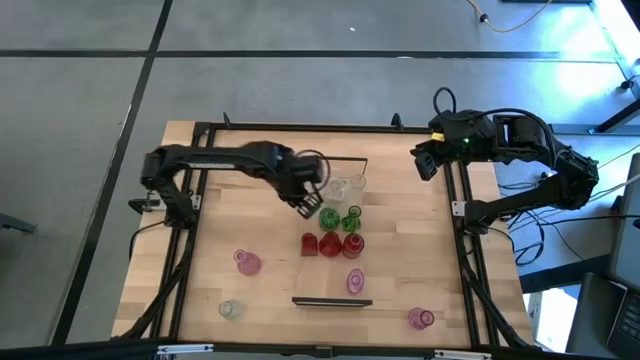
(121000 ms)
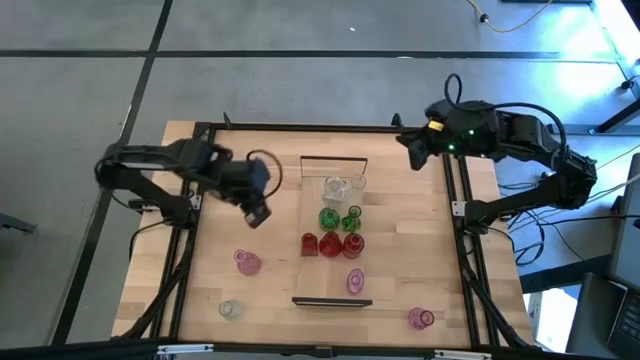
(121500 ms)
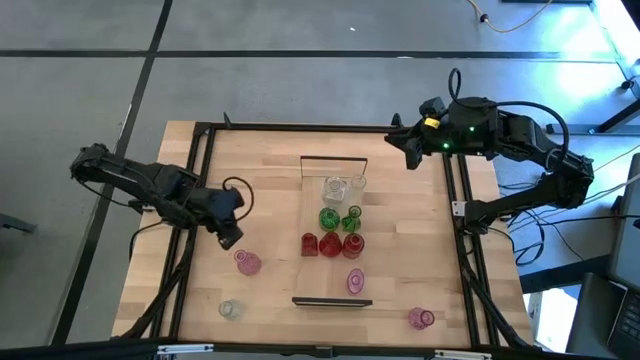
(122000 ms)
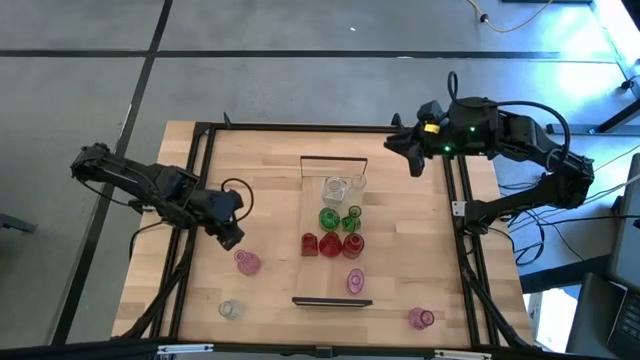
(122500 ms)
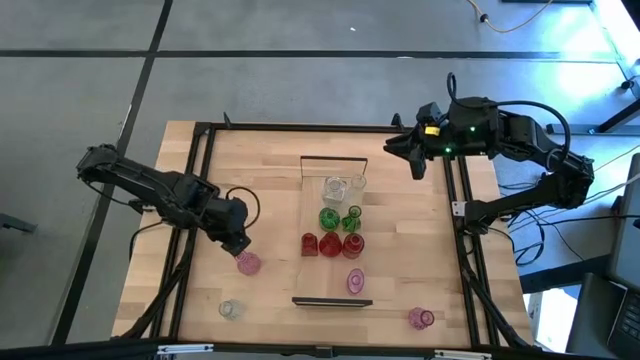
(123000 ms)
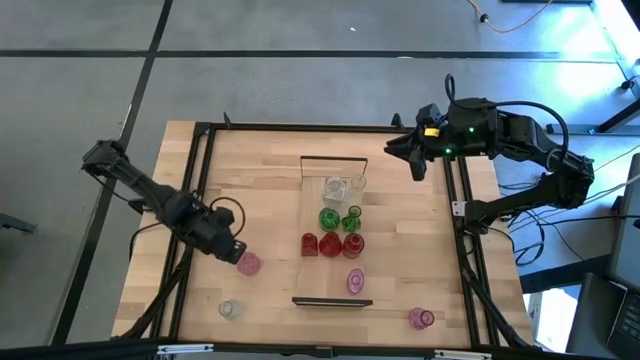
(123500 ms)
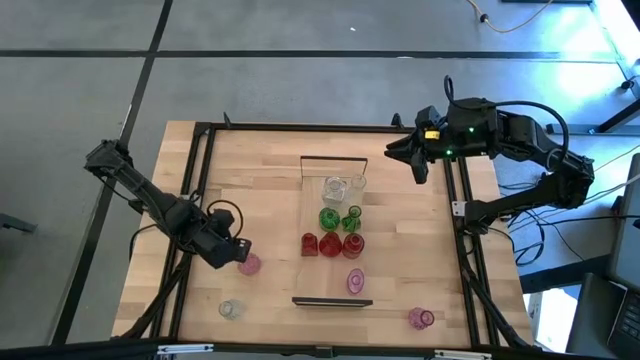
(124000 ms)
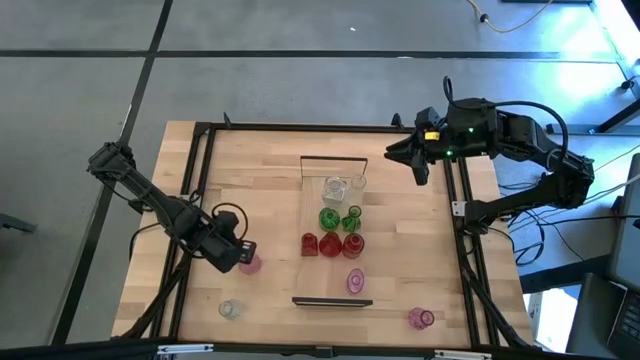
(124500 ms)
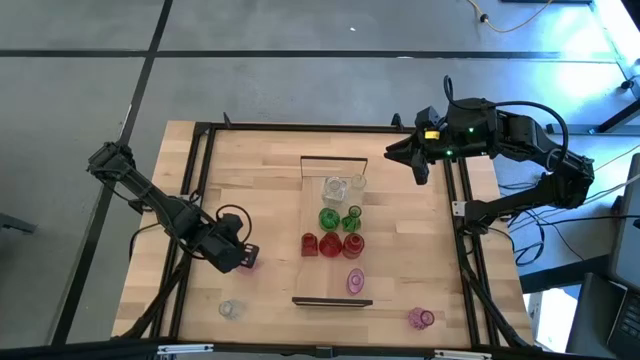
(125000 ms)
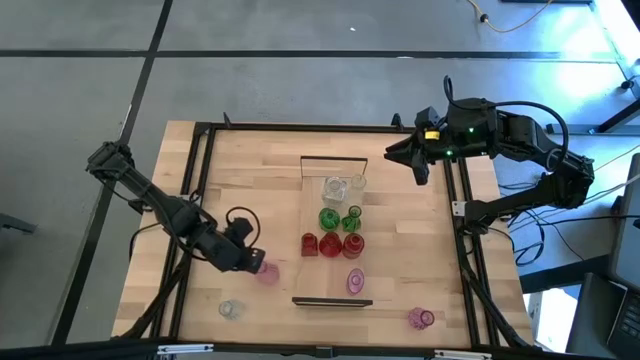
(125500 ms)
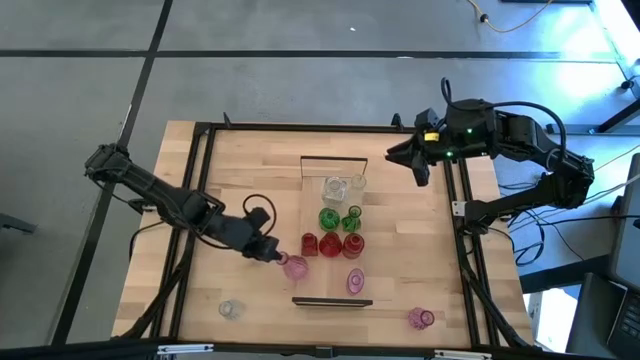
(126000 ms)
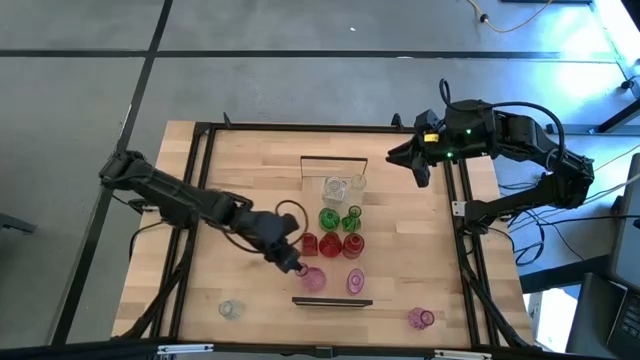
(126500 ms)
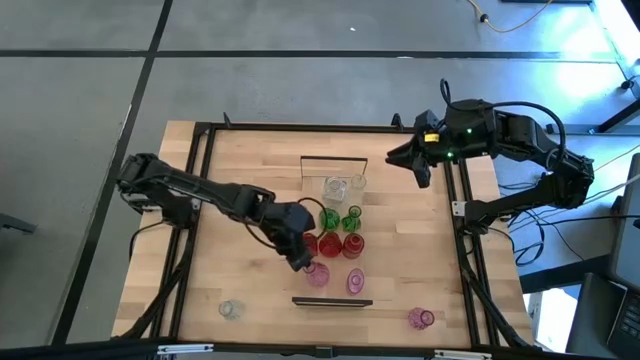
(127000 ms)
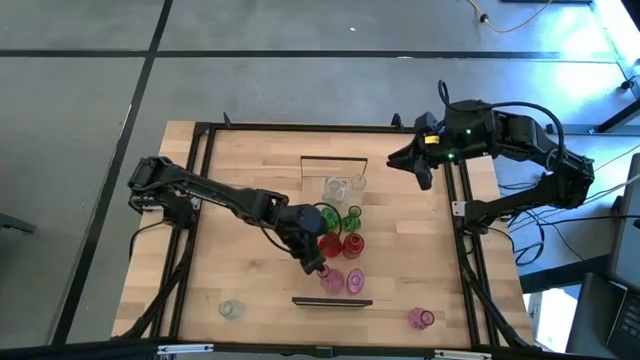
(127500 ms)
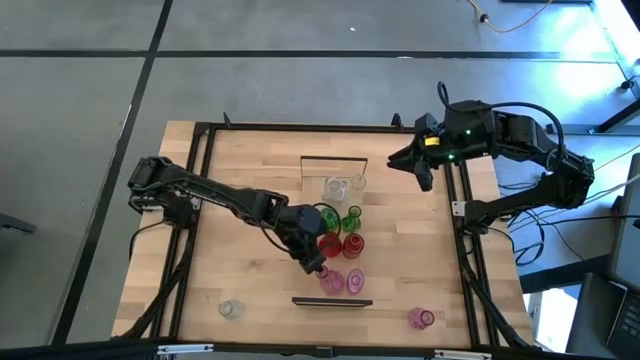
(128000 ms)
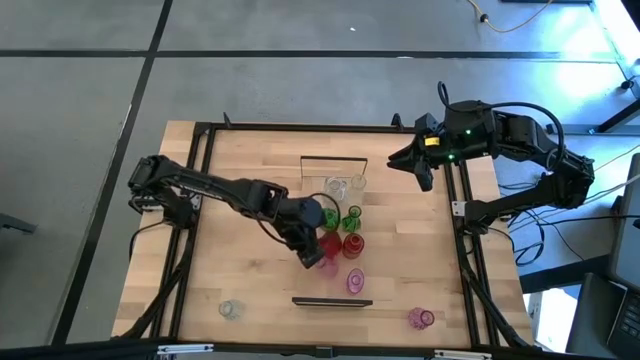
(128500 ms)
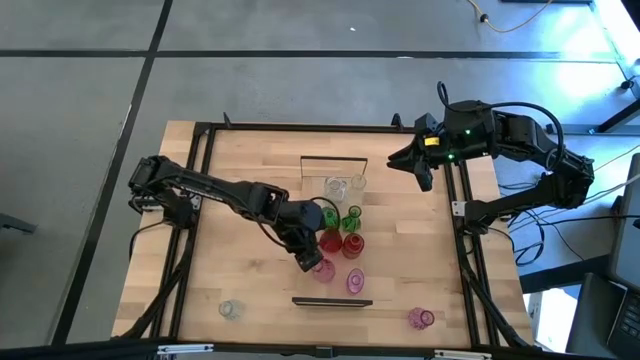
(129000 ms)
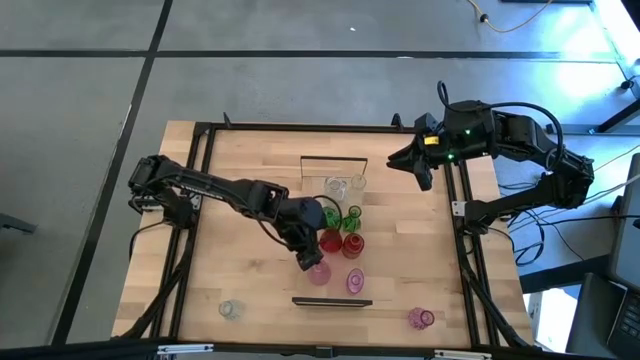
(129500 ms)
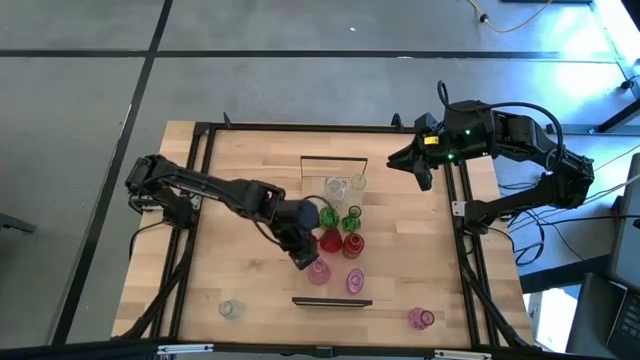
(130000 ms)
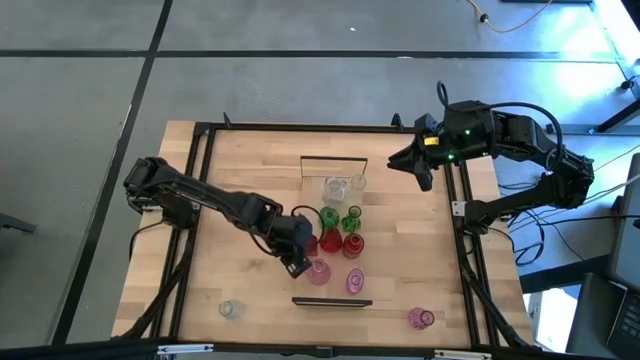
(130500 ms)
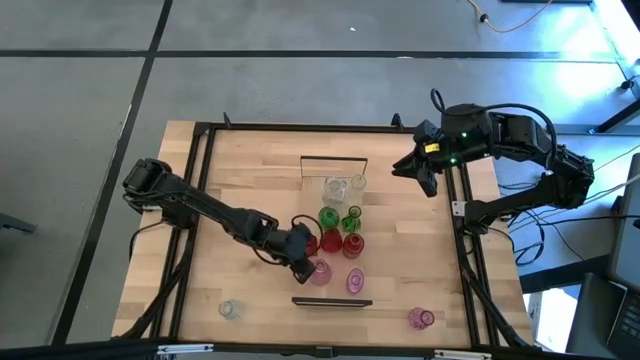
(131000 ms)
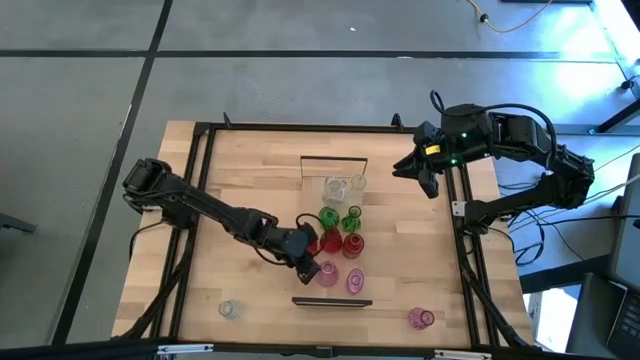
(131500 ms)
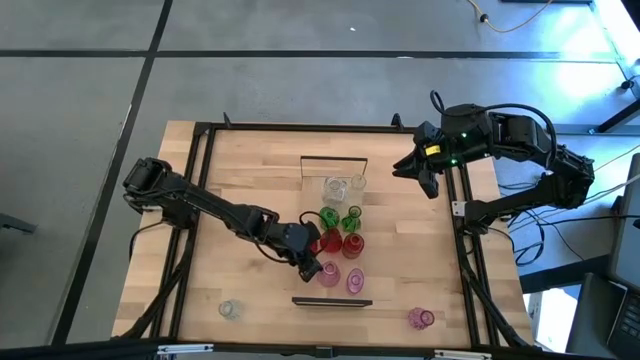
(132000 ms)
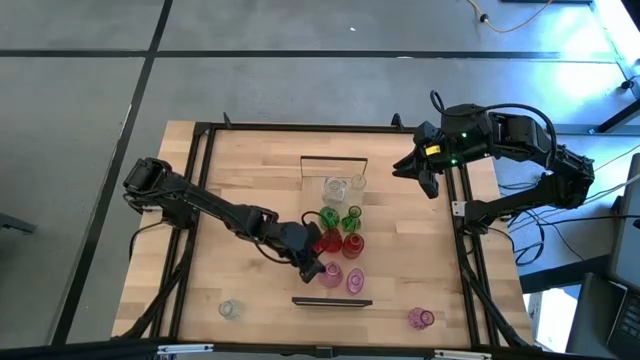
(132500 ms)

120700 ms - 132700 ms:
Task: sort vases onto shelf
Put the left pink vase aligned with the other pink vase on the shelf

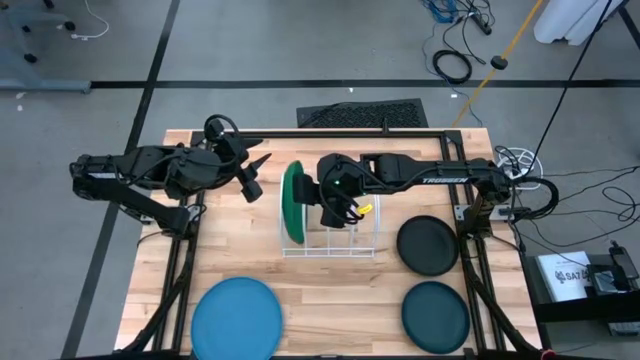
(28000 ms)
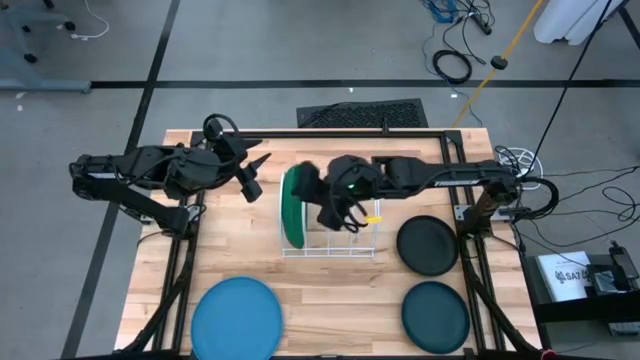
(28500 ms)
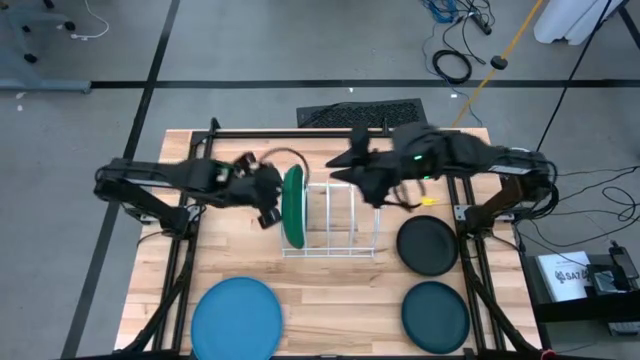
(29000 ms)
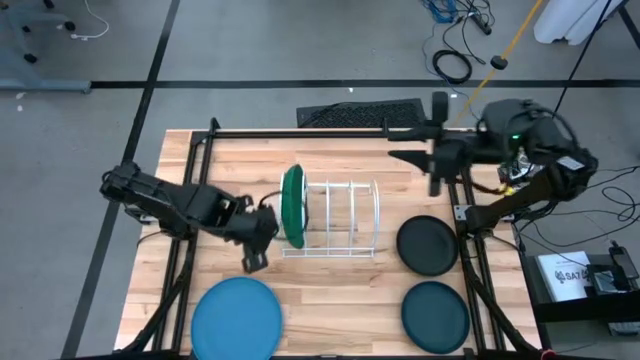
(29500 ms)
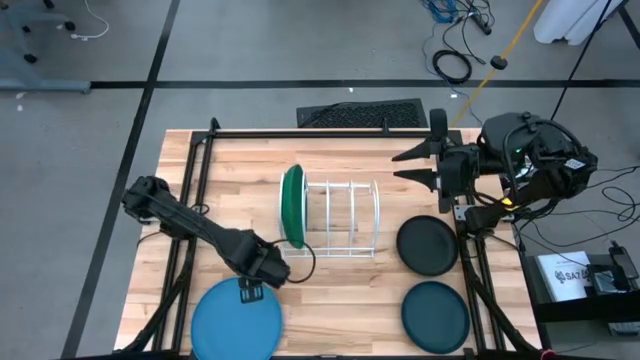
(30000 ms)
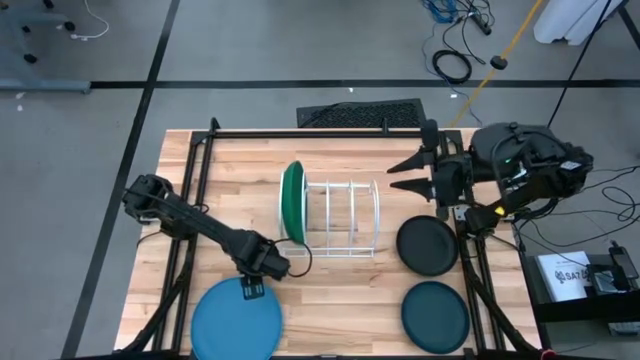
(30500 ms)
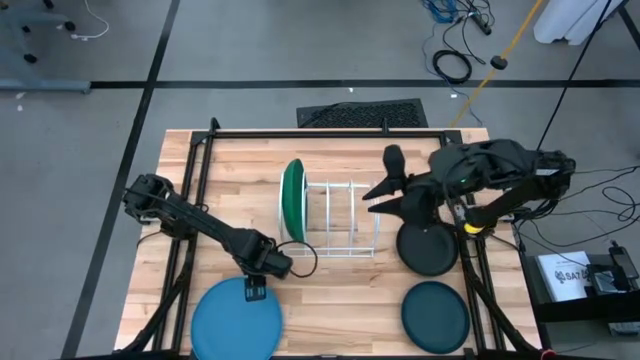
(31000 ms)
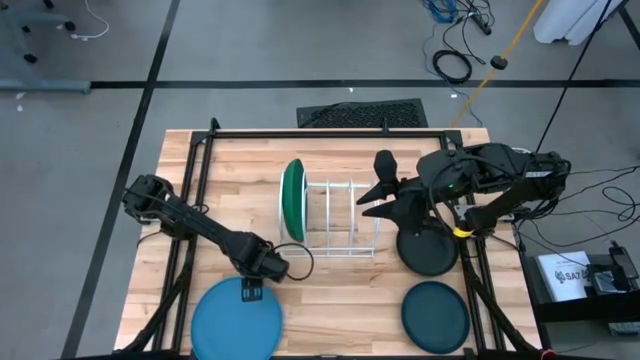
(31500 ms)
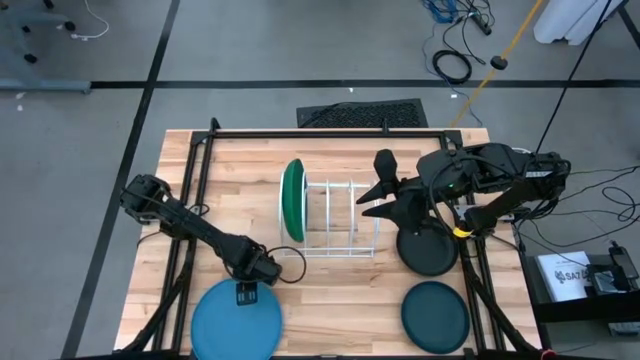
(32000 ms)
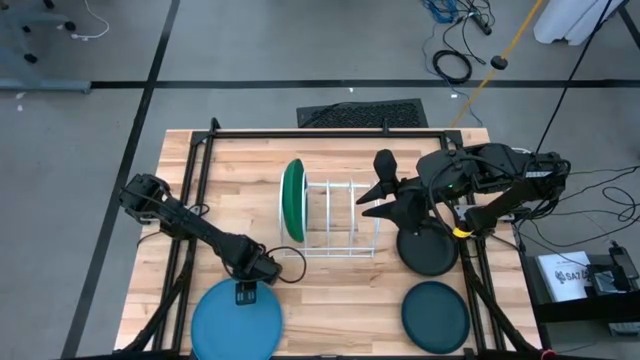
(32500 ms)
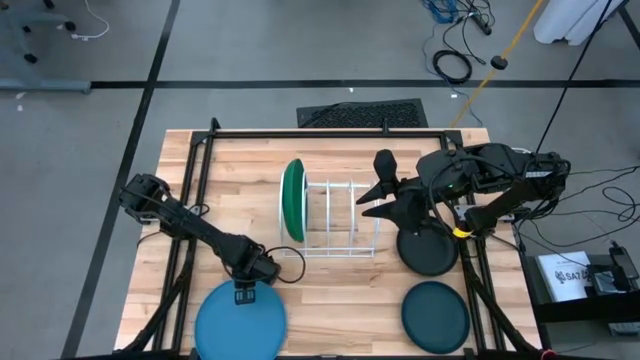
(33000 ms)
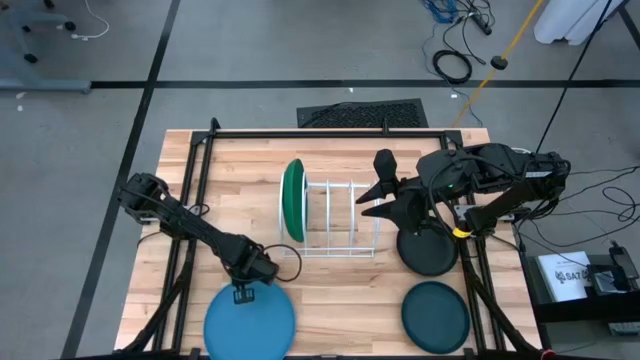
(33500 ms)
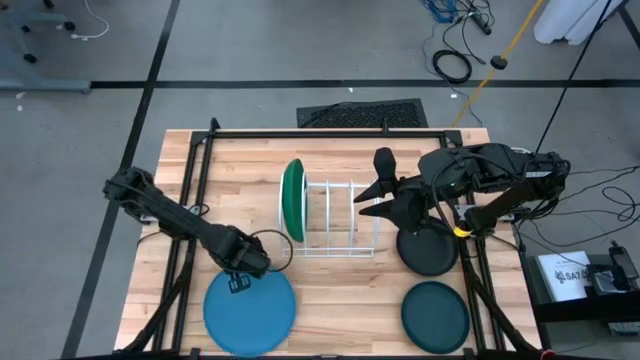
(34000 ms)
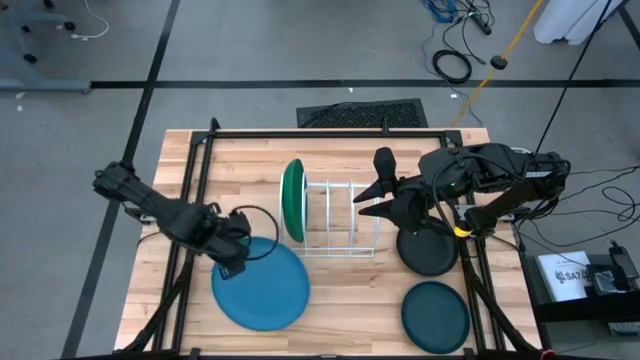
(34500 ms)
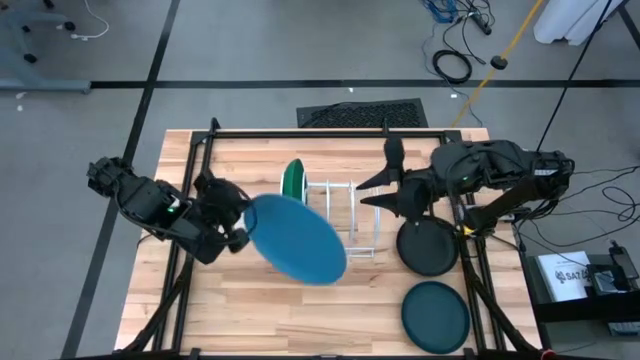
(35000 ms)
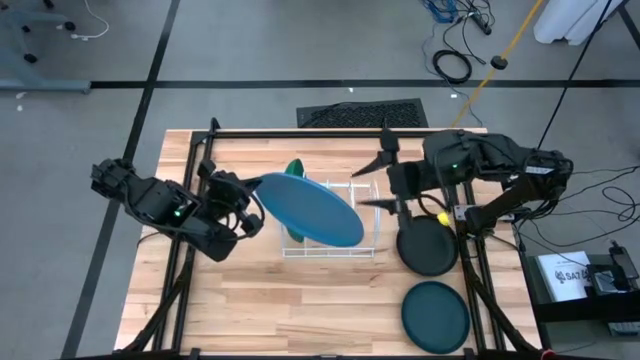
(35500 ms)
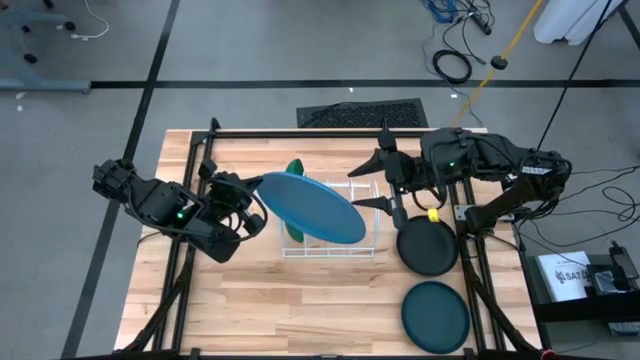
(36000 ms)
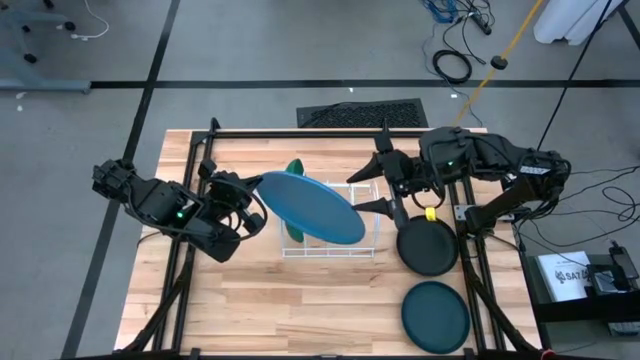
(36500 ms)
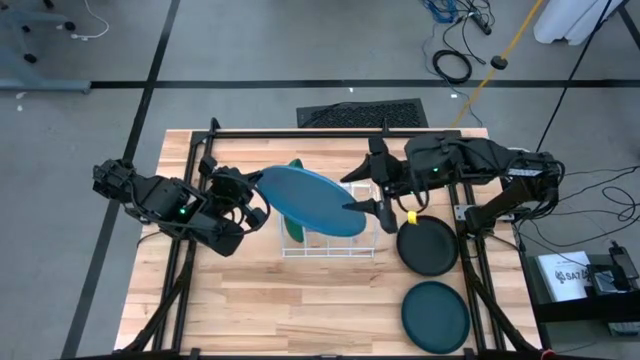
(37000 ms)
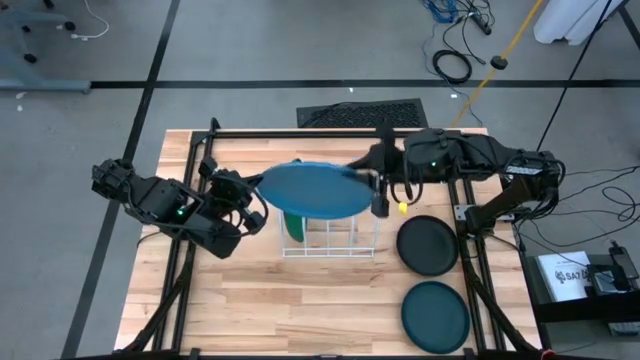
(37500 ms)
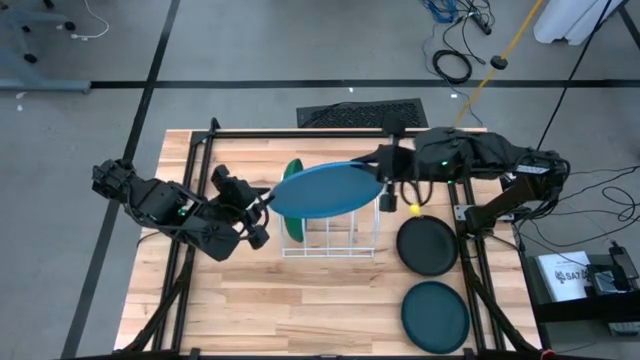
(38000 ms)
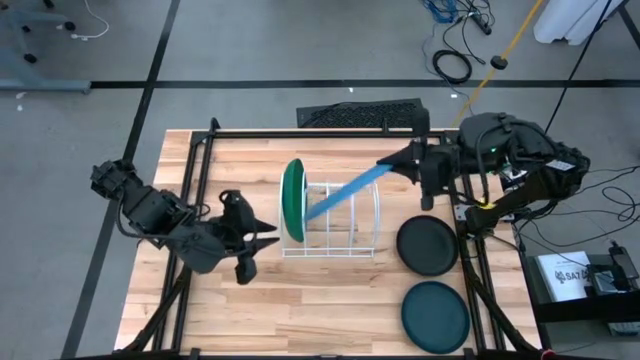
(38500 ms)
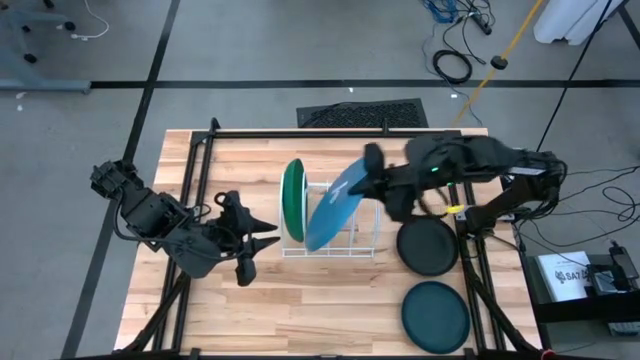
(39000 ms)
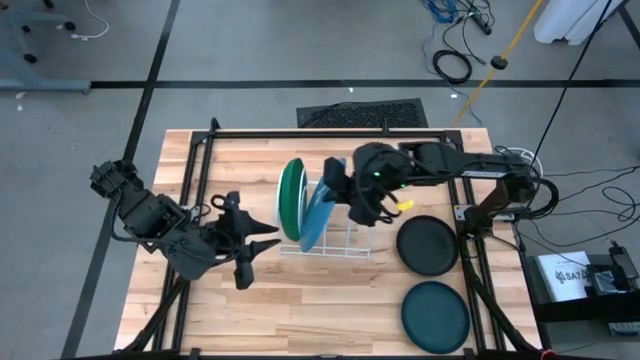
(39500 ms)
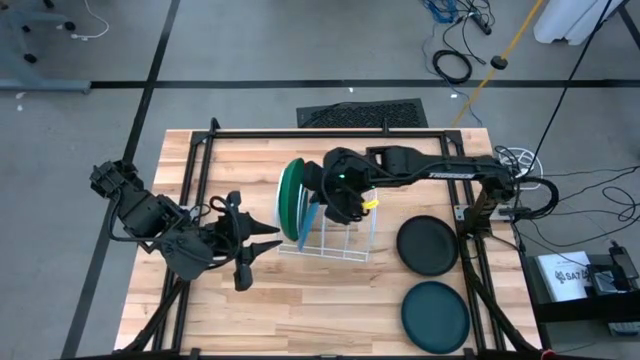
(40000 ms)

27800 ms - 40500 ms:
Task: Sort dishes
Put the blue plate into the dish rack
